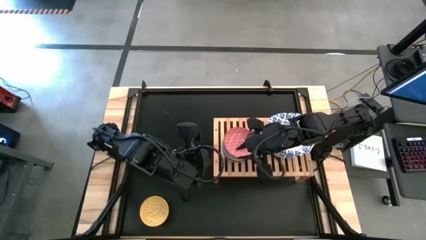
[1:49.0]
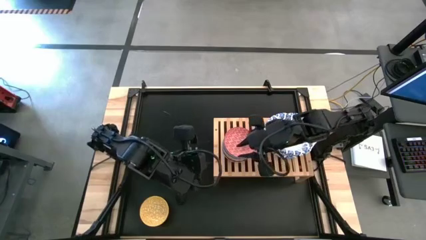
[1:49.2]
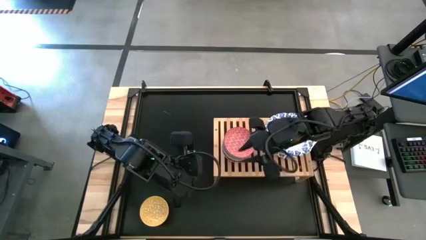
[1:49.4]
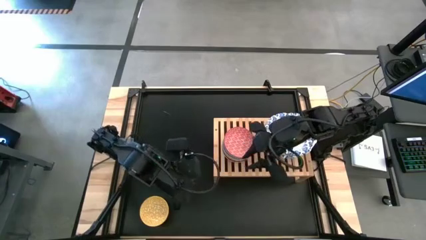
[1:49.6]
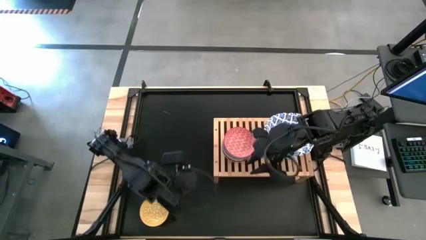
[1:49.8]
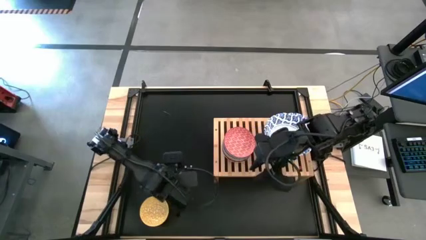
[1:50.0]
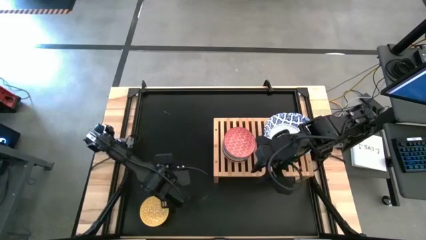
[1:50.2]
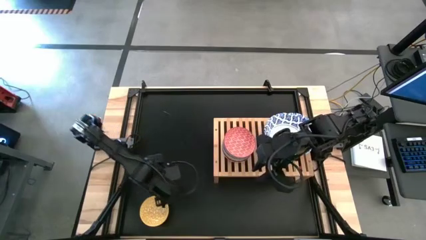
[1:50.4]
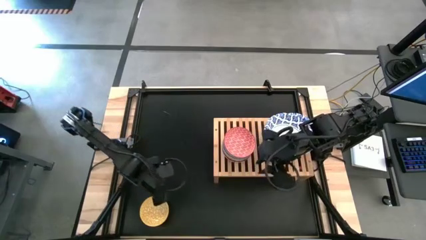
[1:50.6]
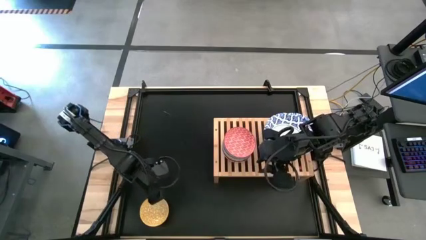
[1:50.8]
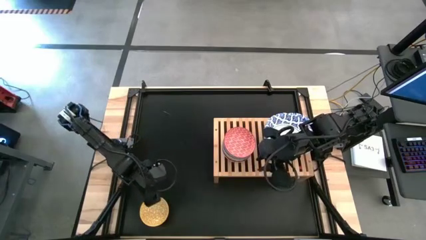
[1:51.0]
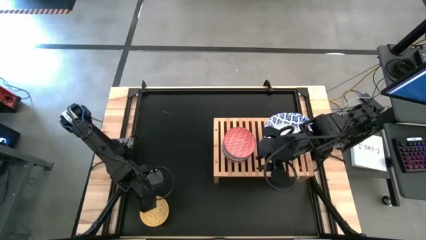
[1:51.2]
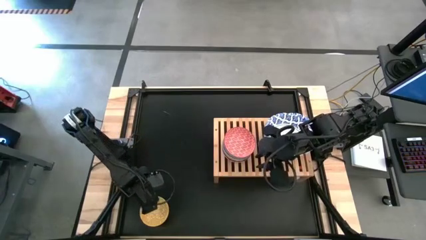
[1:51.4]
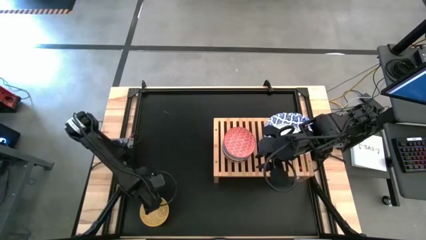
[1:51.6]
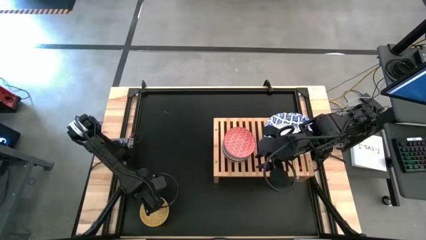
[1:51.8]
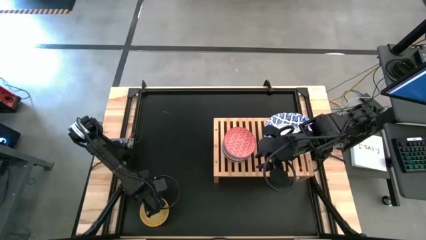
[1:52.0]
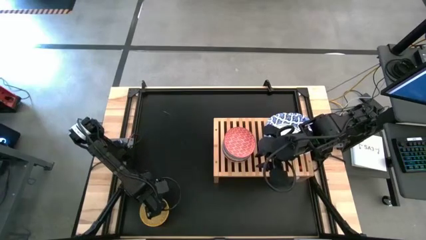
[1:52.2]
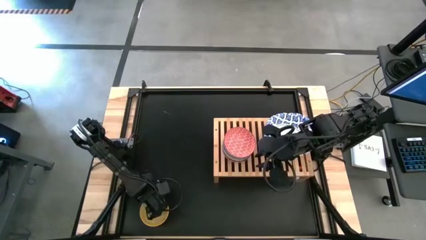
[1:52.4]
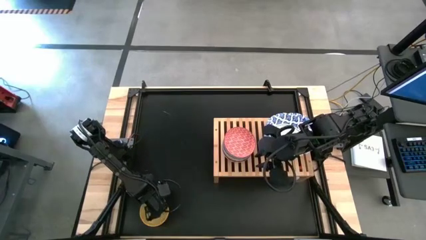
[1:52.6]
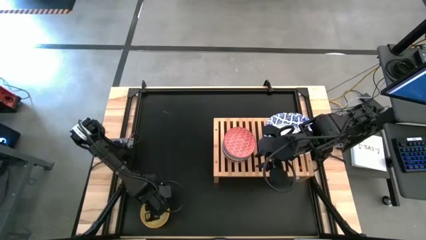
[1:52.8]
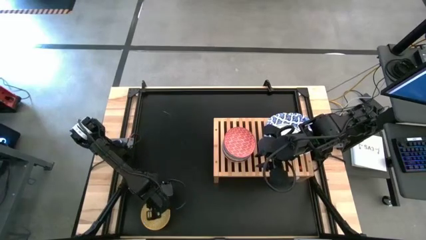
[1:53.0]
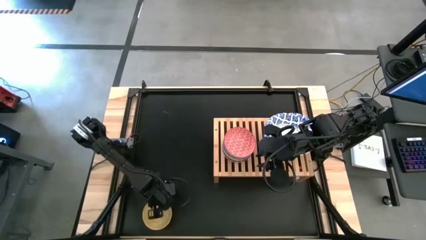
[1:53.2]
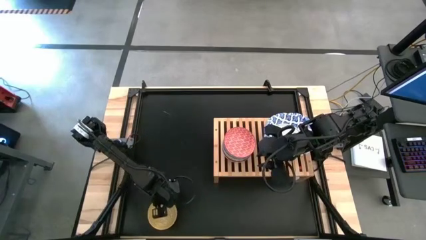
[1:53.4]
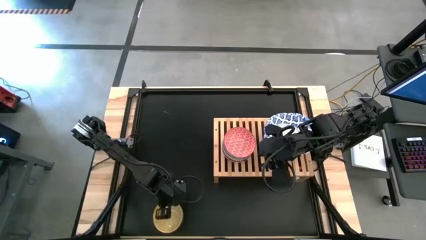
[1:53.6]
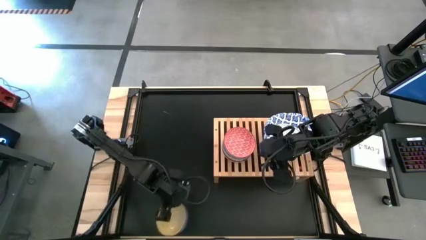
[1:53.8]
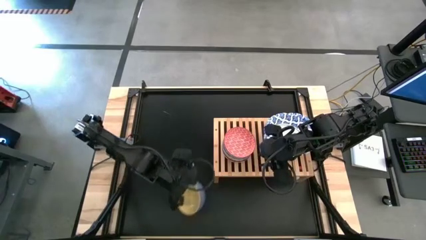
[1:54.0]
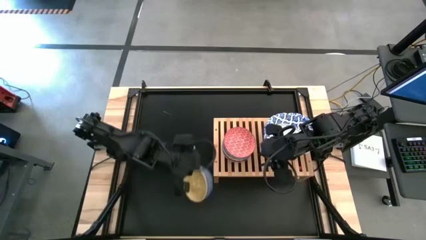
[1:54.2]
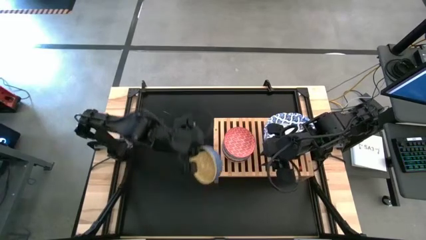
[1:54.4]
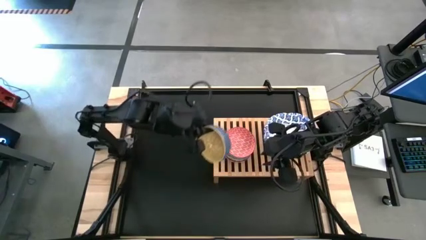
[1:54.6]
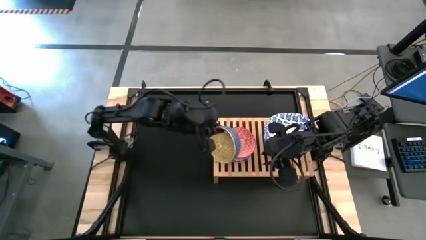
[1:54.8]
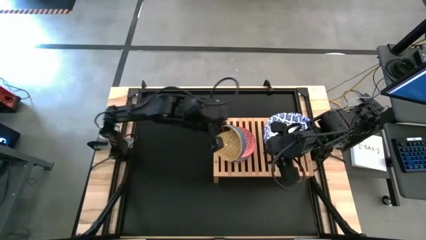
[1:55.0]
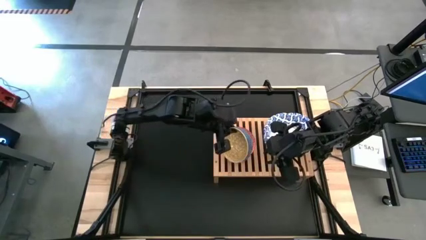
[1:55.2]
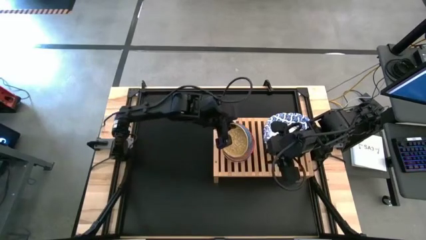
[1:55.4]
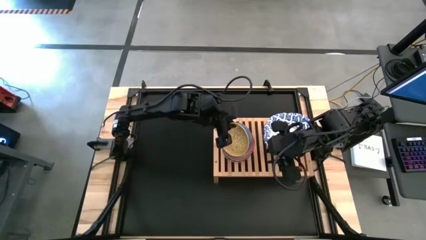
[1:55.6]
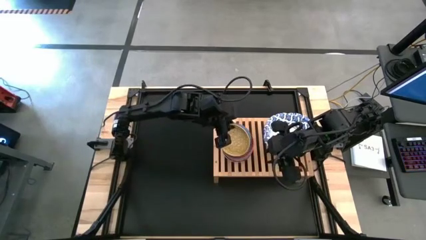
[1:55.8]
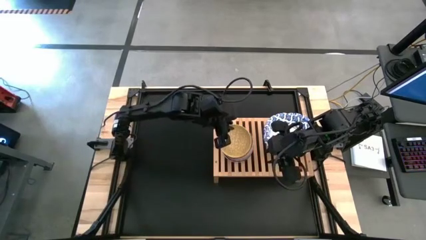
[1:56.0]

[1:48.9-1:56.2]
Task: Place and stack bowls onto a shelf
Stack the small blue and yellow bowl on top of the small gray and orange bowl

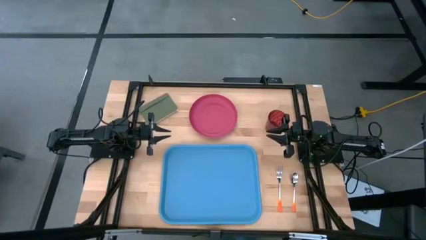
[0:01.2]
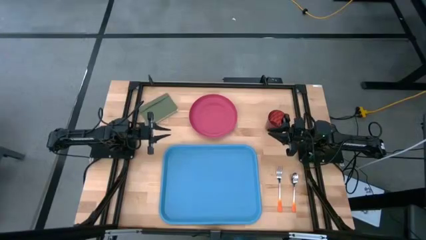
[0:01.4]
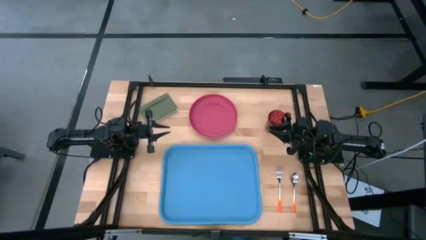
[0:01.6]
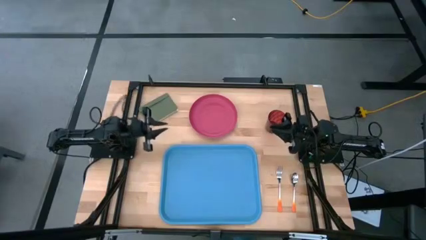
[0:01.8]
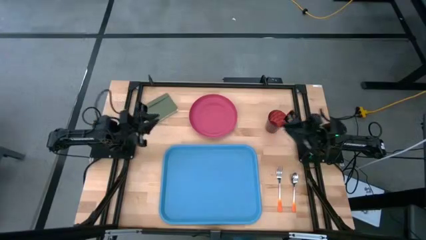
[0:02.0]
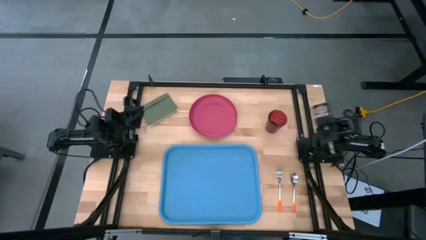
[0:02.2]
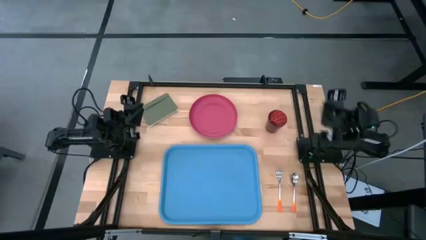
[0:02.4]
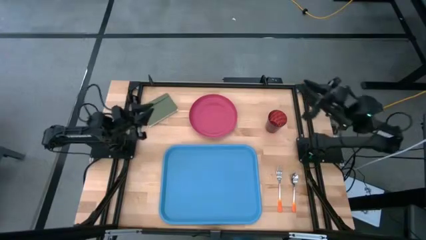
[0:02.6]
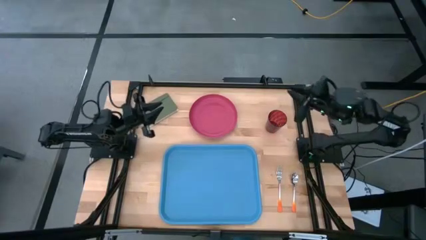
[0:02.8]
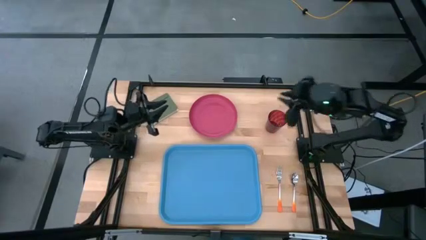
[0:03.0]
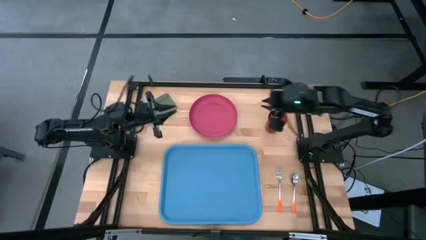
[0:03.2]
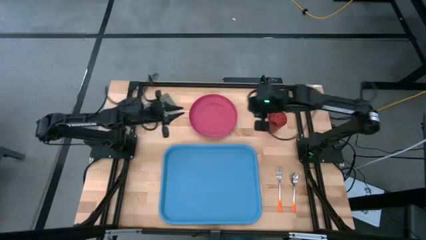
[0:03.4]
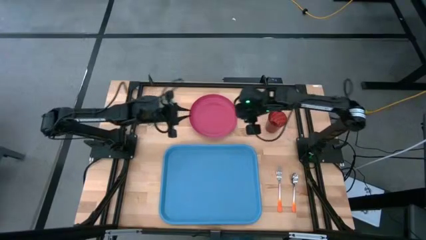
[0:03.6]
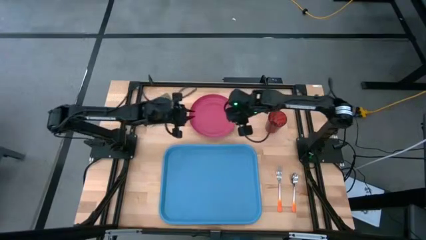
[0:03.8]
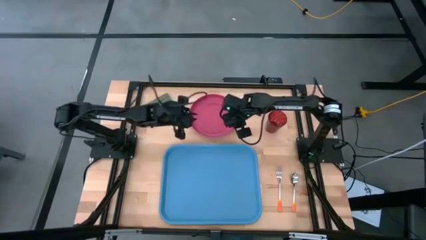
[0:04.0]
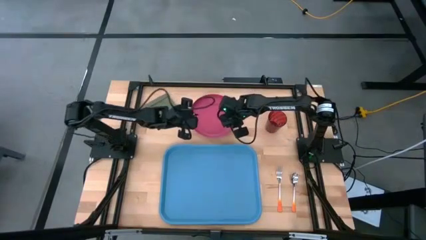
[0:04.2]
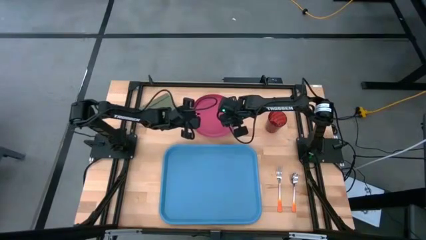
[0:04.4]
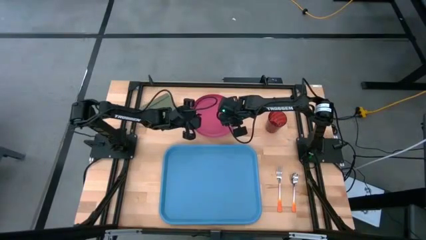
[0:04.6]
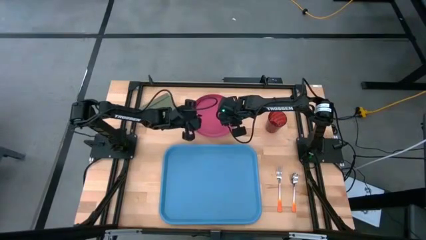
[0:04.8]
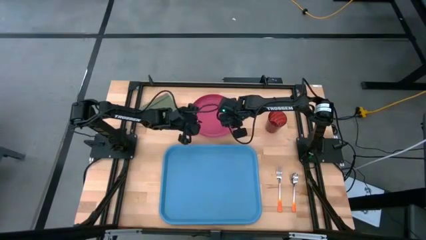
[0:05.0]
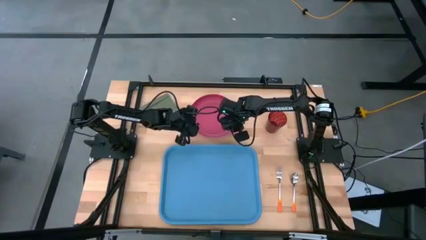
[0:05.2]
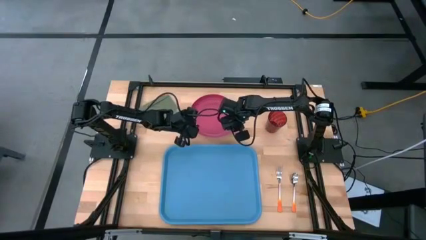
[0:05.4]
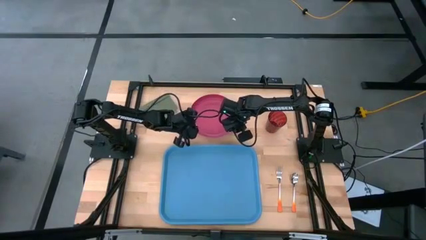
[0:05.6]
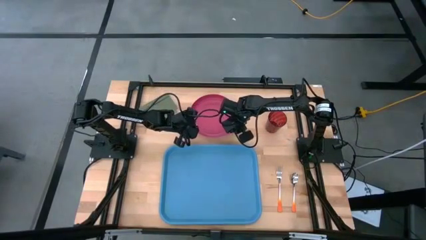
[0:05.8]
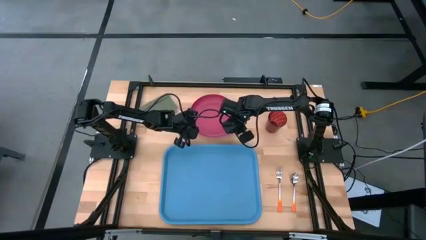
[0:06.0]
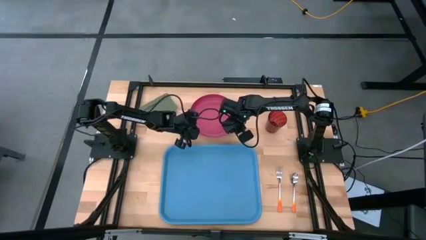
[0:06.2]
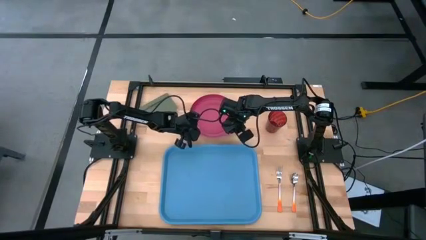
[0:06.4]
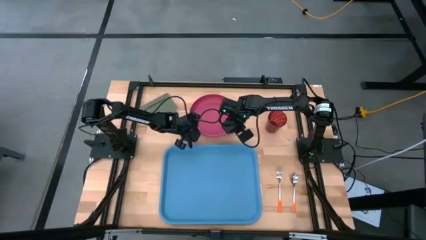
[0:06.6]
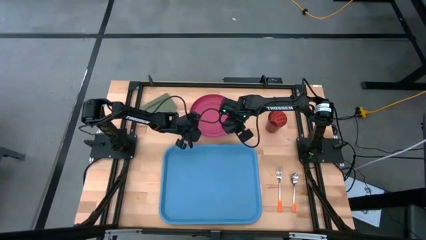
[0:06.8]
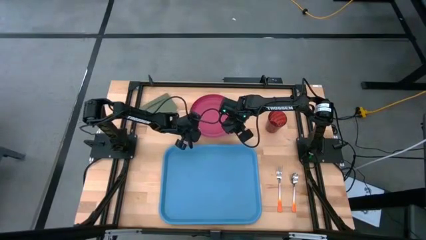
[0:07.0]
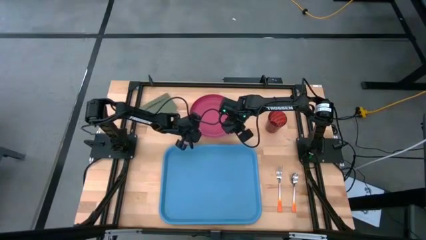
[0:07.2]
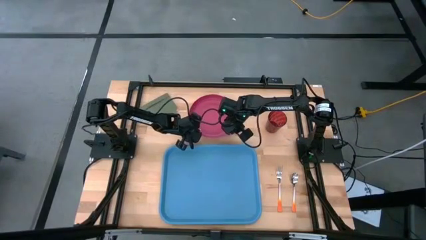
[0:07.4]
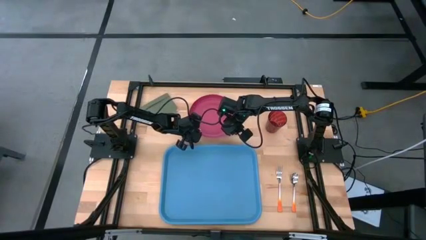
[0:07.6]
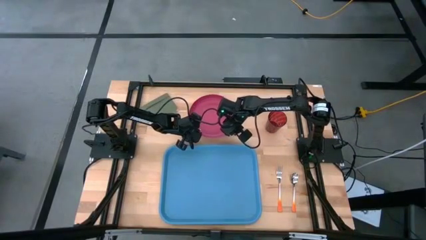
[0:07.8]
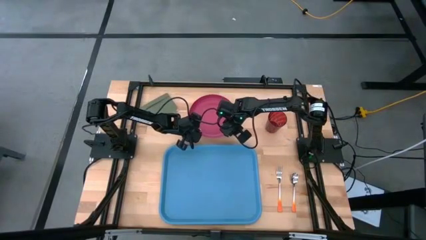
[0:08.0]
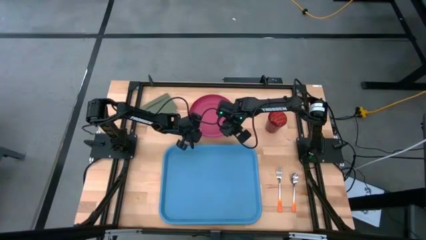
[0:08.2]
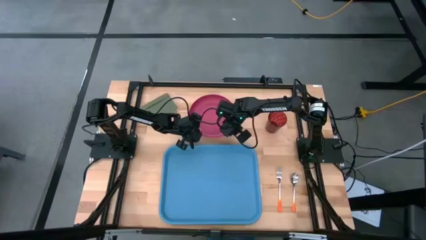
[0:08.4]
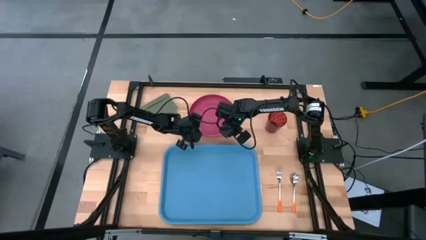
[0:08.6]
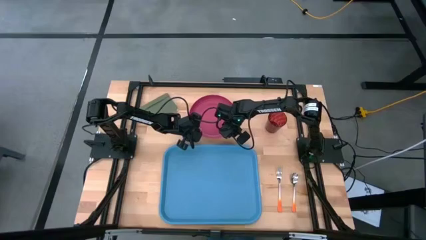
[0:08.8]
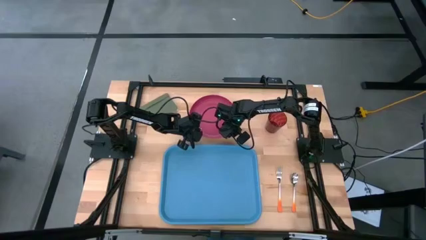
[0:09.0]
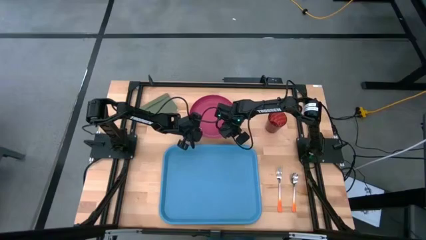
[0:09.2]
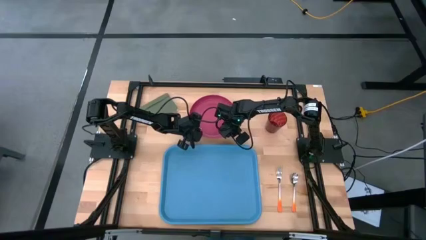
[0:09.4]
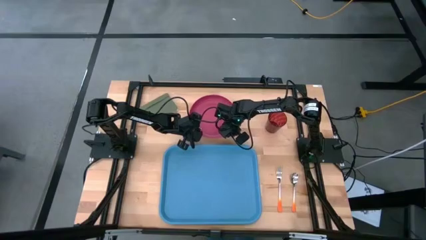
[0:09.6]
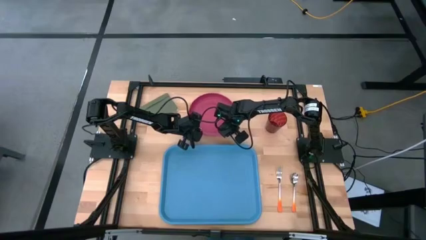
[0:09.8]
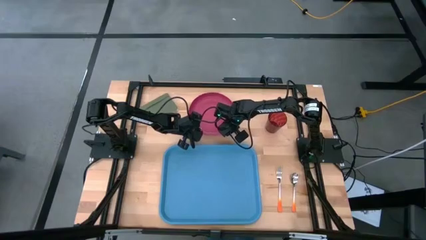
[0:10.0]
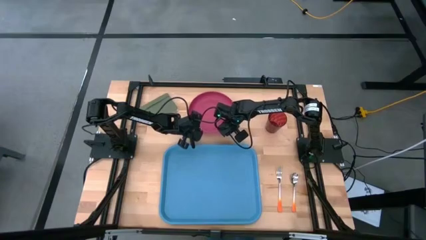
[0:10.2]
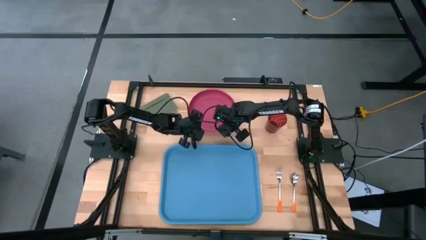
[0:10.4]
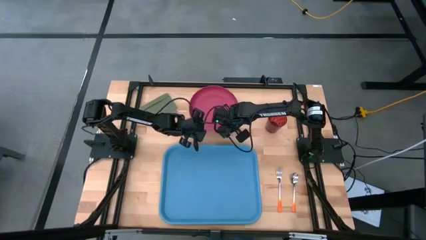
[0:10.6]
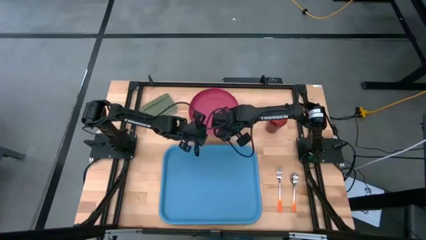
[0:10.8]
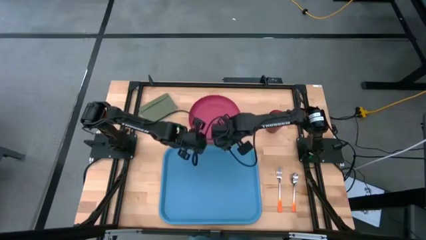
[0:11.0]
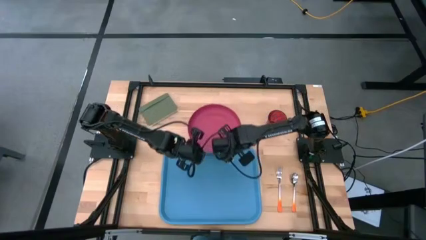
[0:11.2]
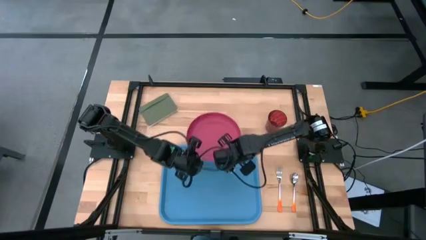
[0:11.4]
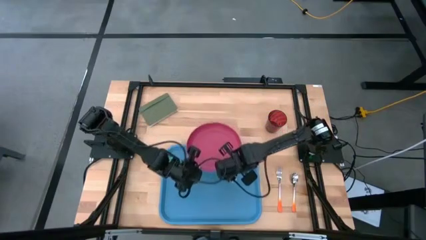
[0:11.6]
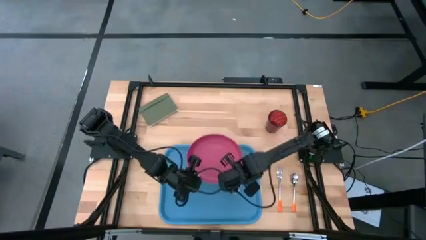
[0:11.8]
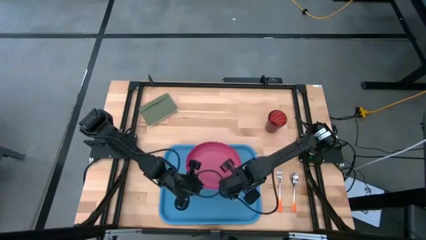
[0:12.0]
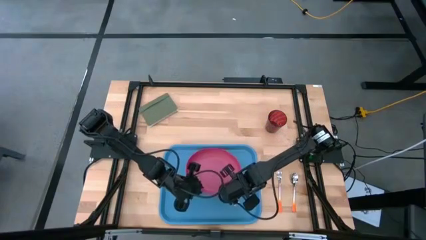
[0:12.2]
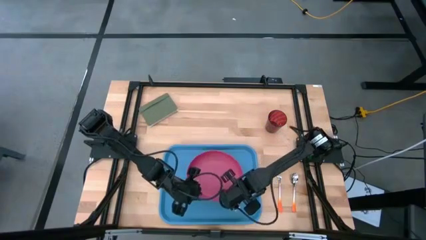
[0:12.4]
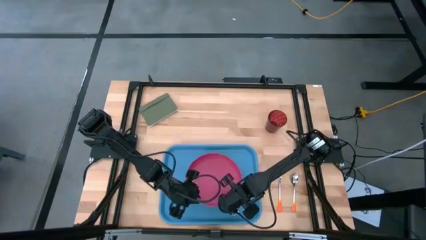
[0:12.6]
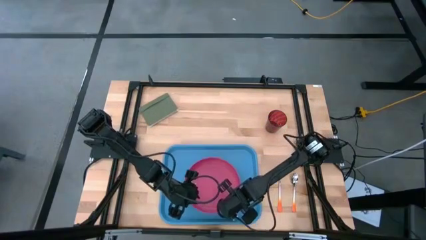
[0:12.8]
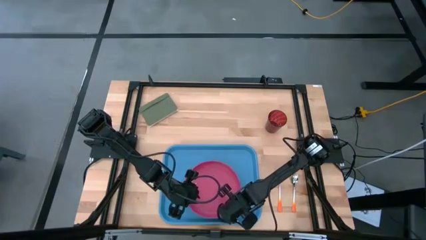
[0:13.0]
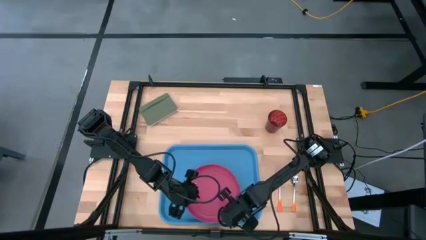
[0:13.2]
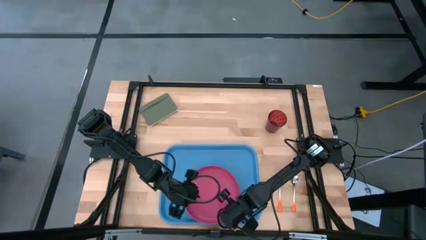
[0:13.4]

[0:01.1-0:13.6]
Task: Pick and place plate/cup/fork/spoon on tray
Put the red plate on the center of the blue serving tray
